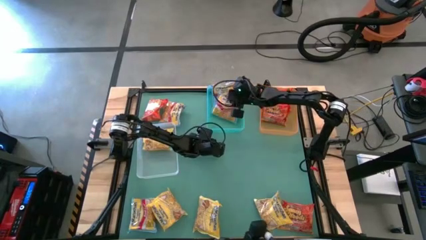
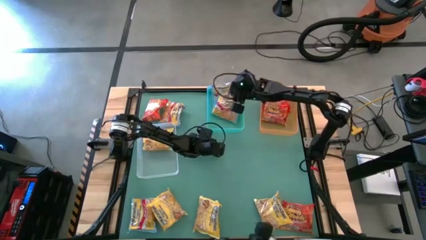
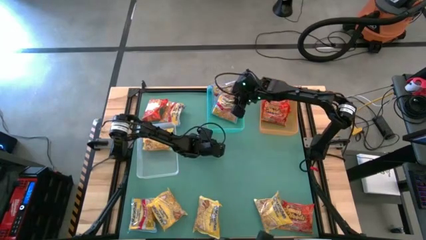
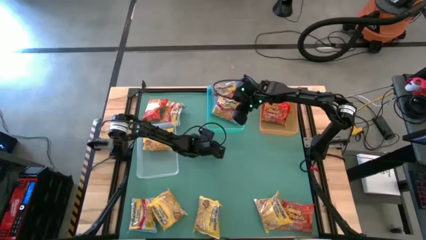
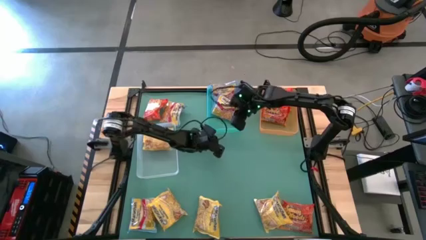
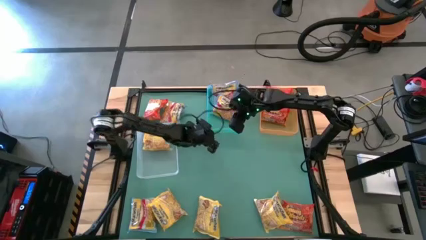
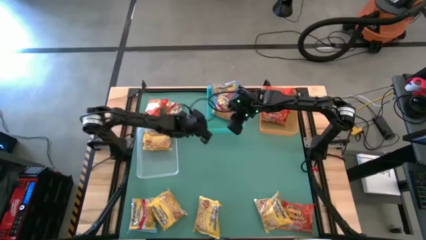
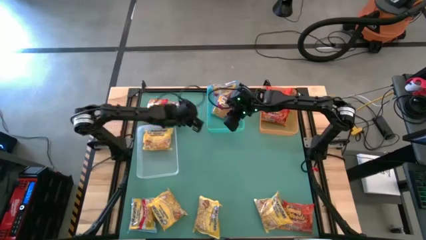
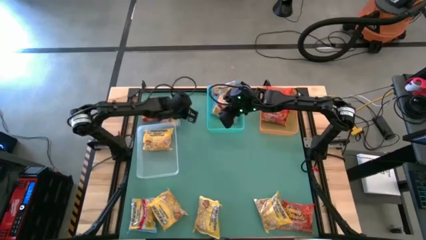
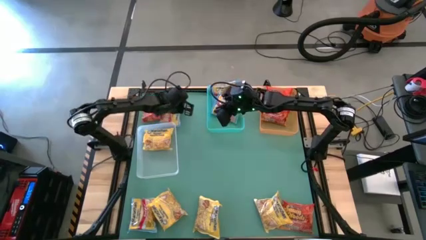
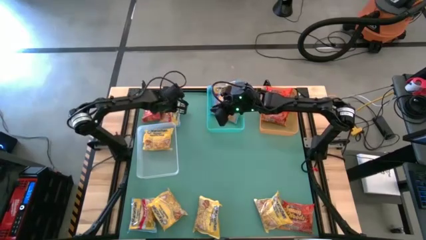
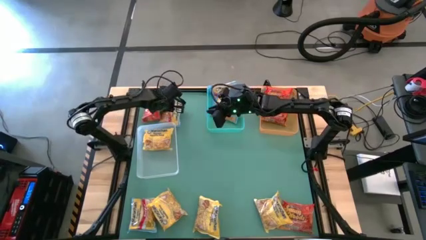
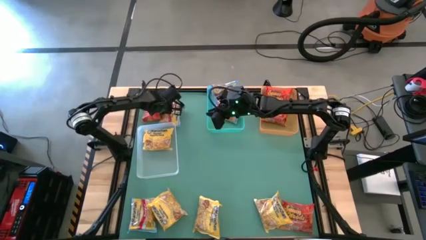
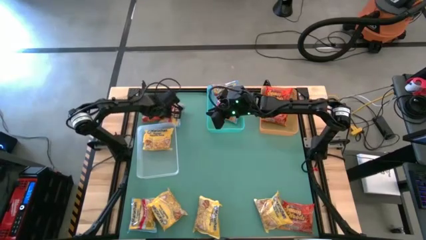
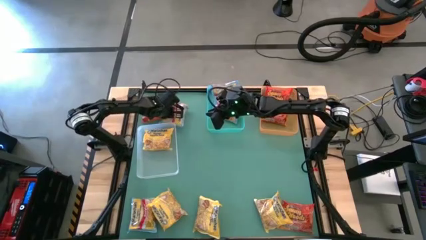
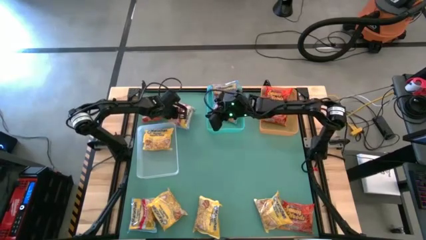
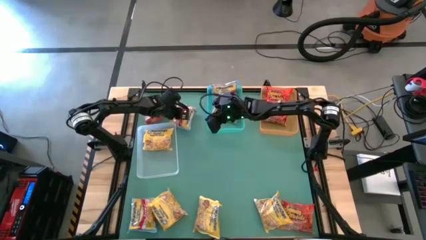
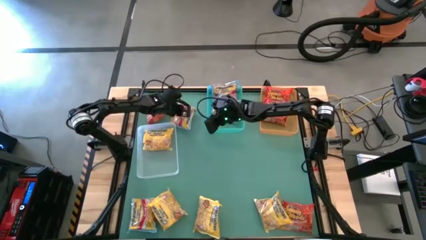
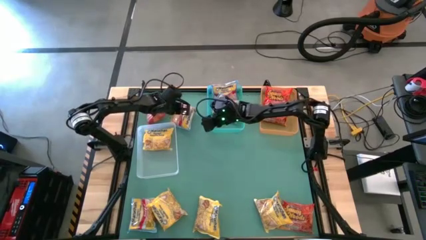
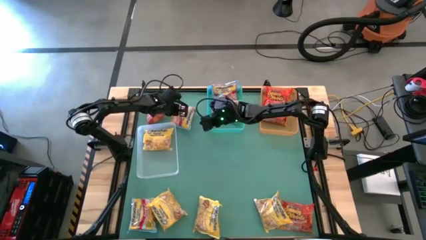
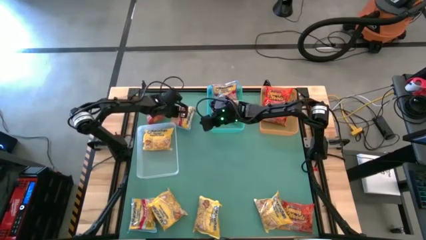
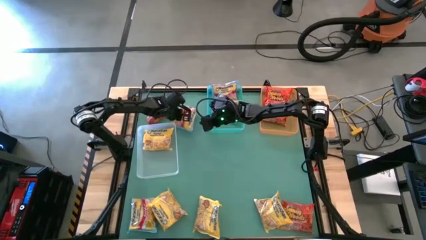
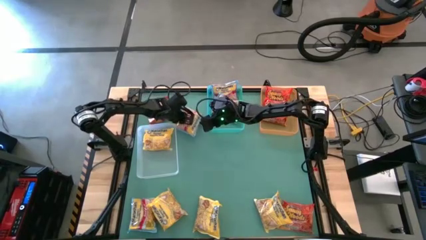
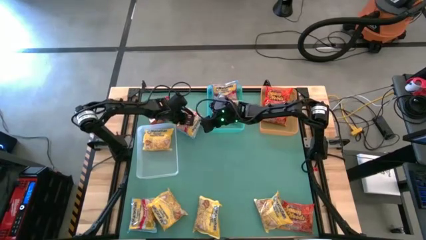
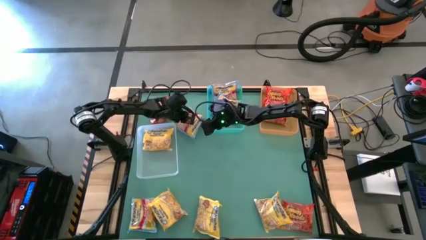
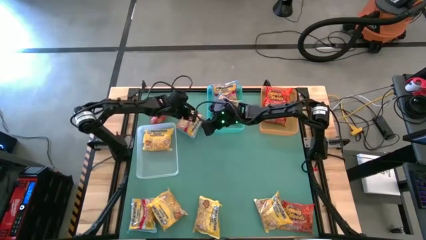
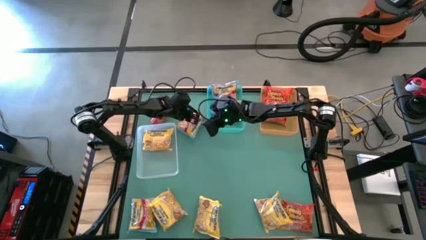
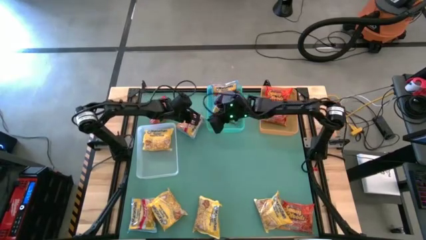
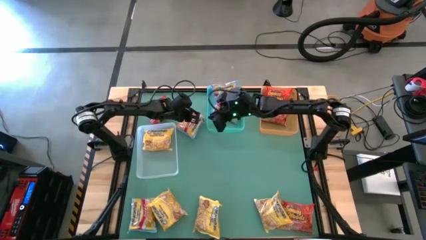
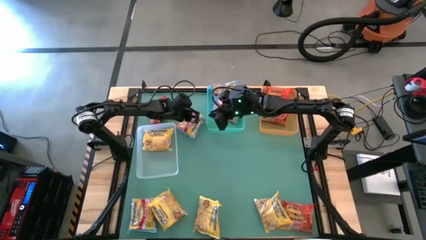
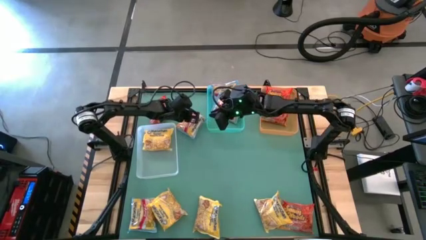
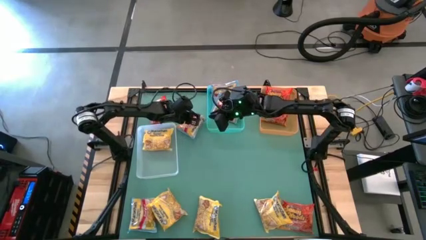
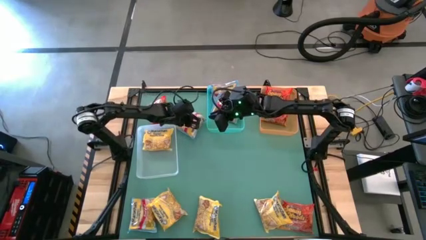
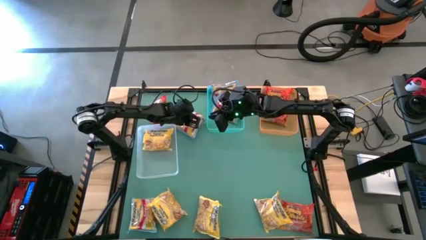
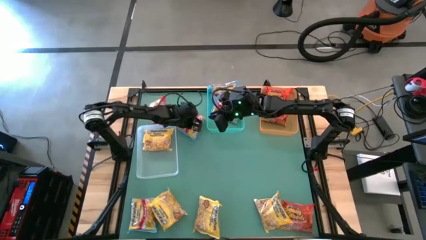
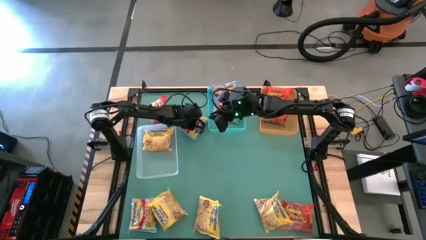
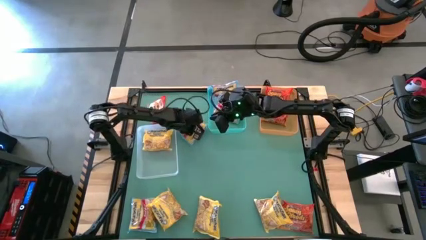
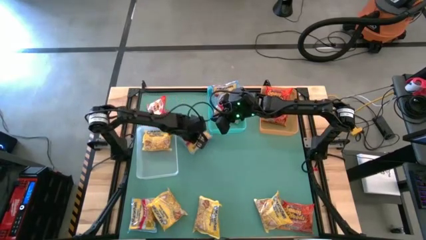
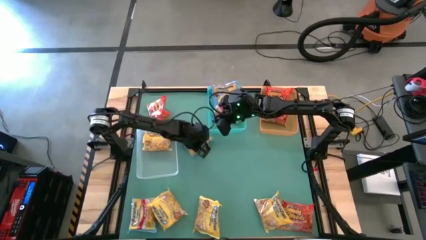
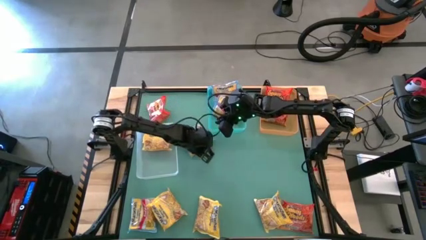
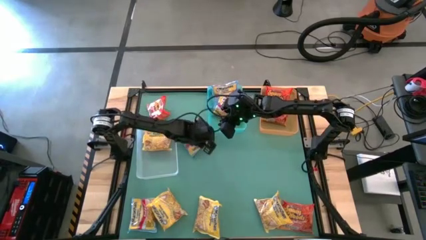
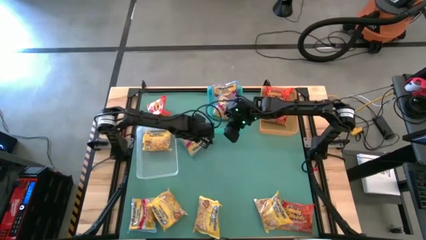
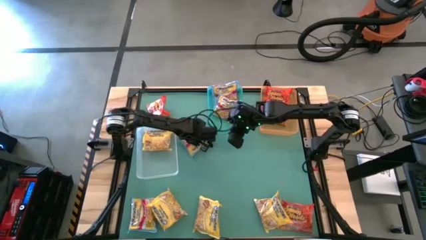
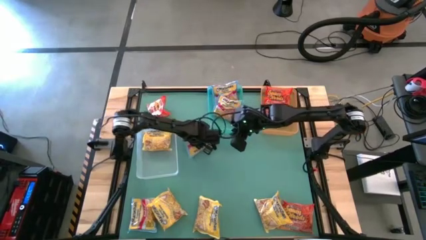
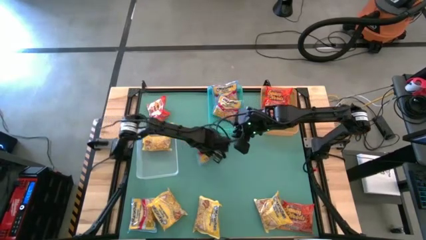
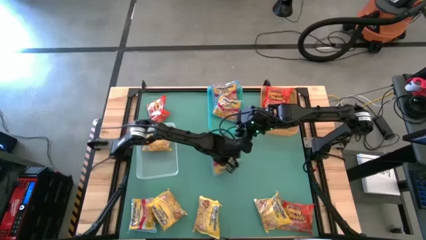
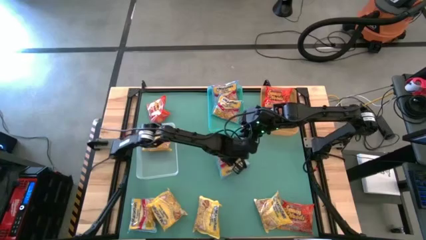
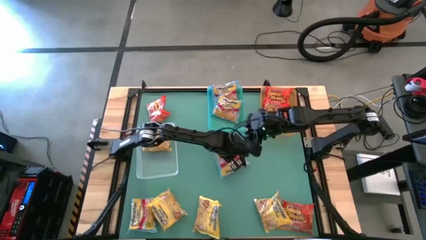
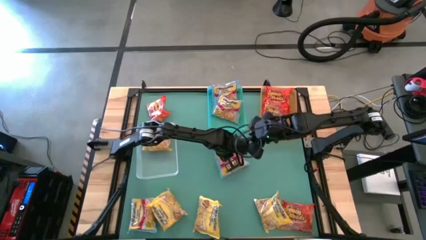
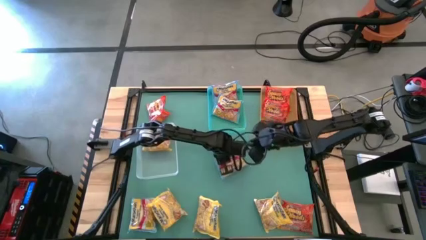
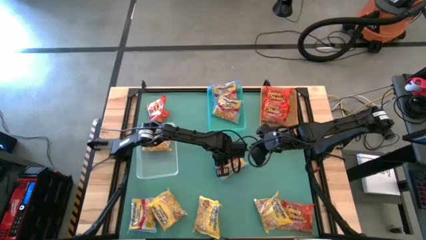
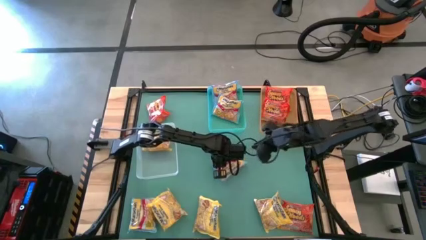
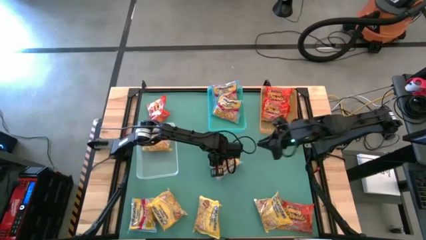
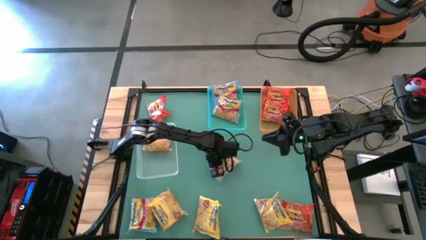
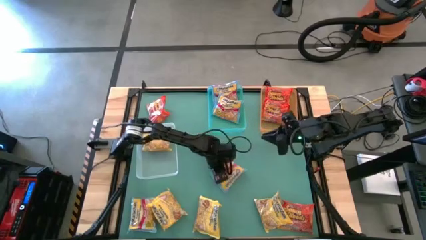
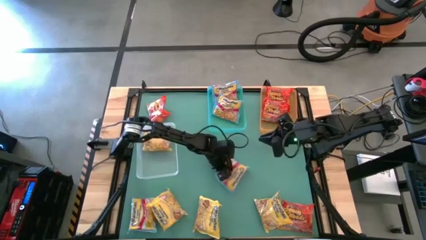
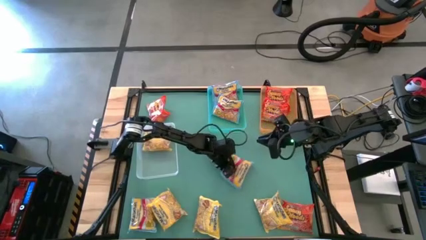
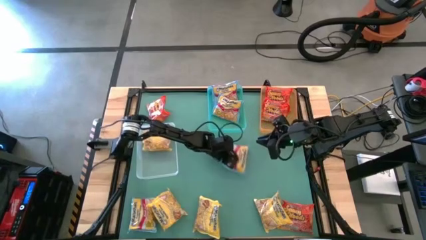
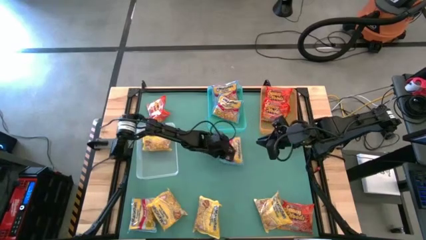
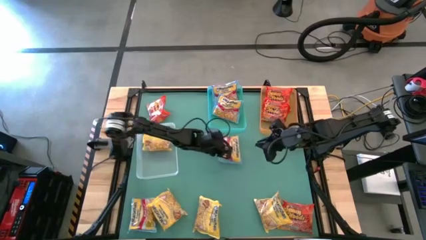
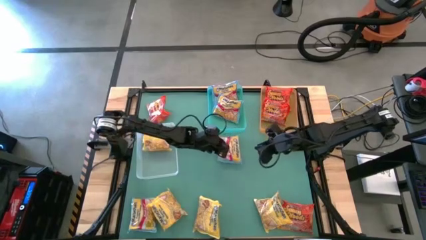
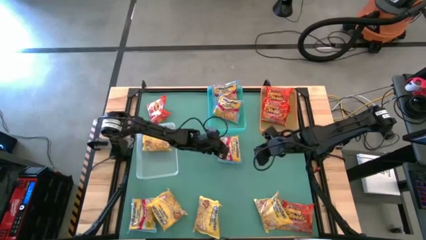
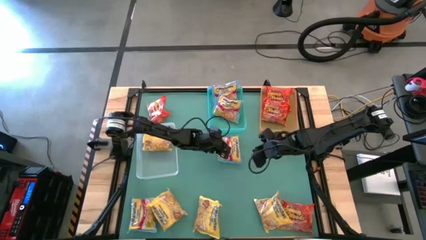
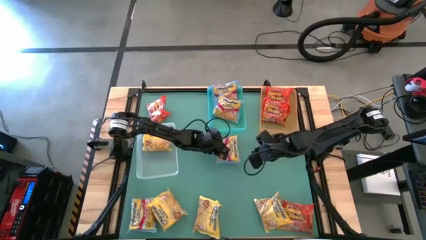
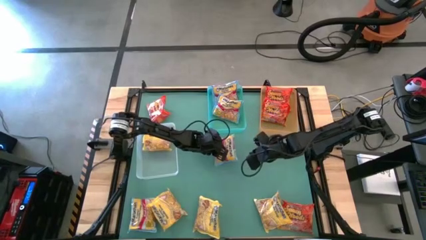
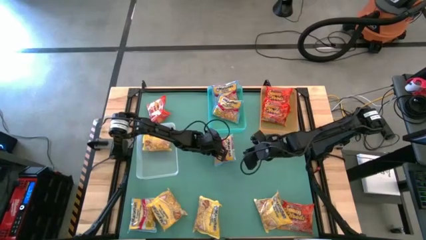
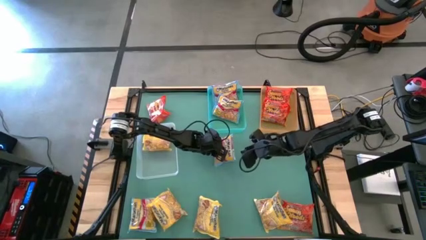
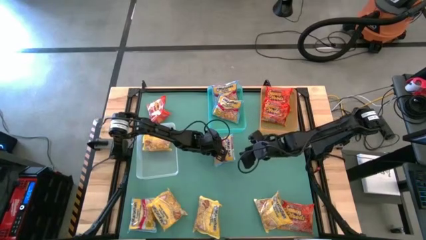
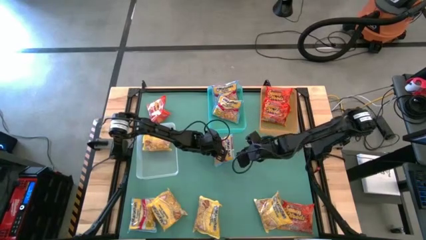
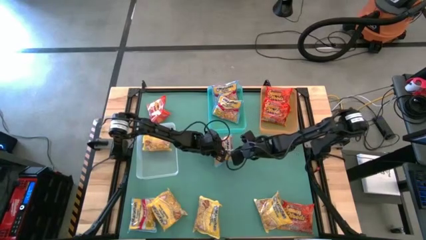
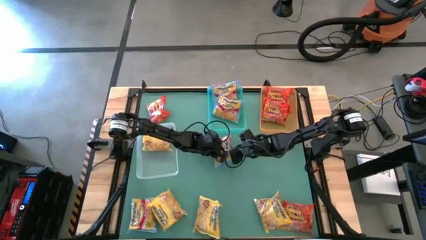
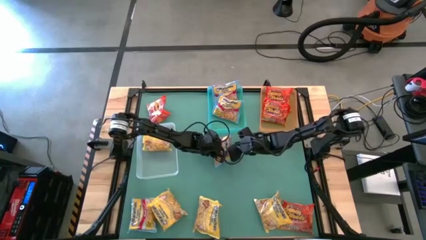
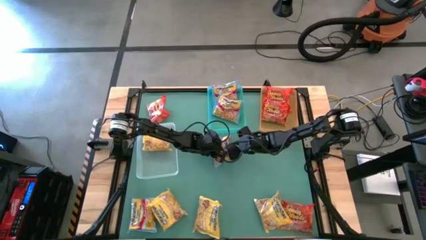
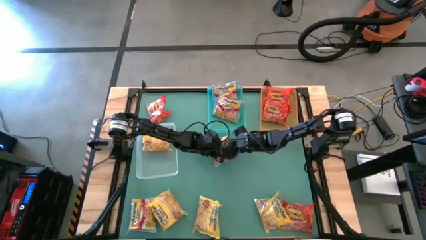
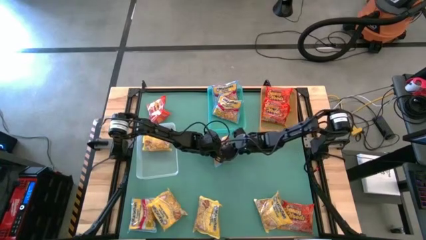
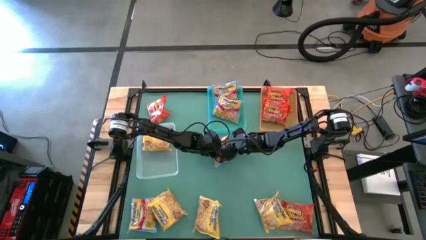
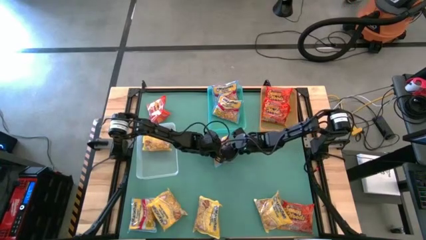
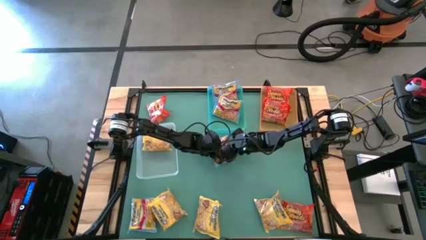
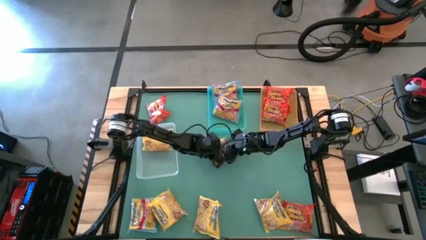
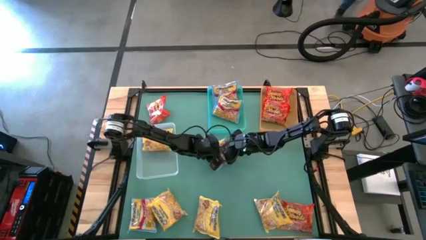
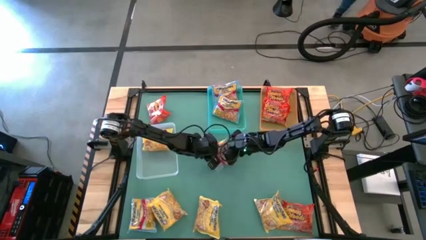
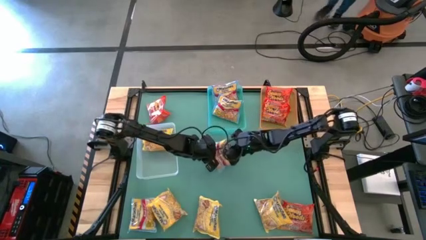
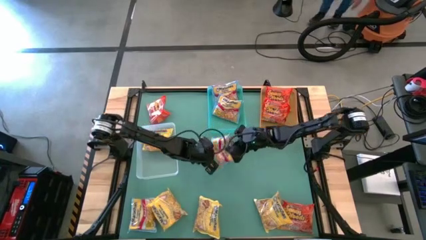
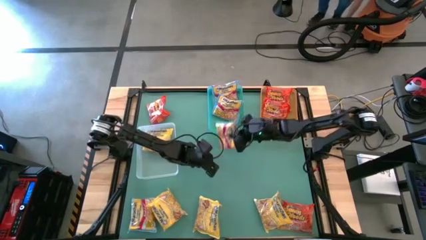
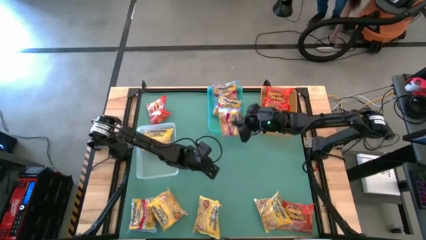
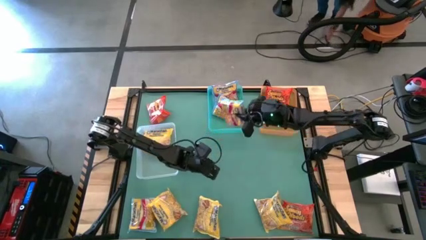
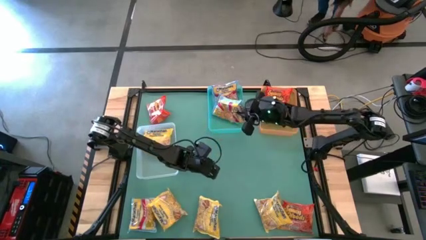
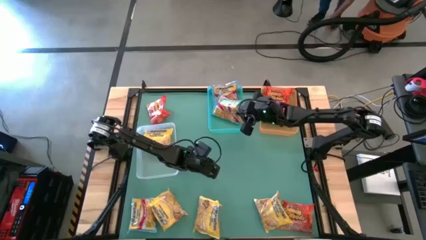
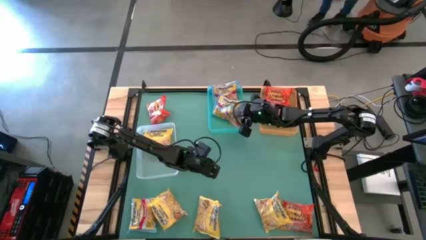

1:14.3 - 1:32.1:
Task: Sort Maruchan noodles
Put the top blue noodle pack into the blue bin
